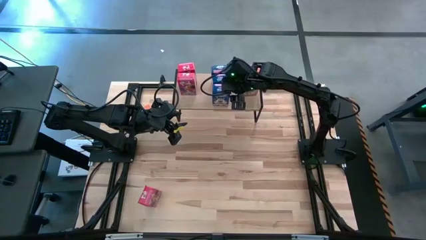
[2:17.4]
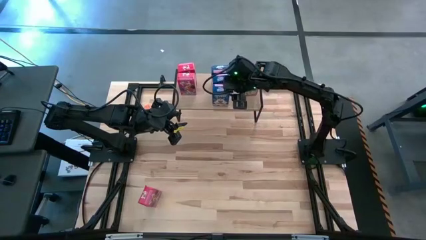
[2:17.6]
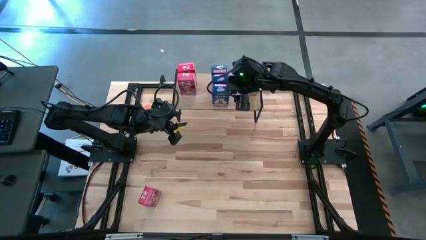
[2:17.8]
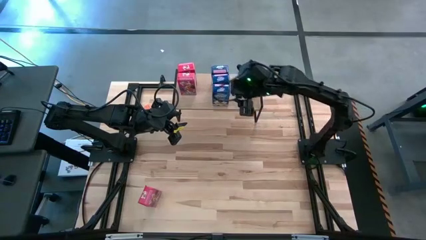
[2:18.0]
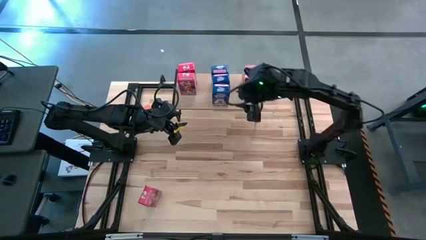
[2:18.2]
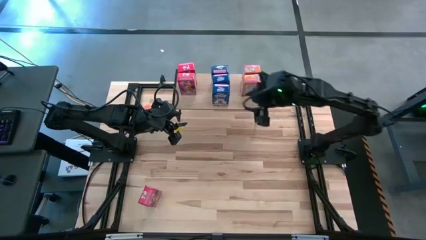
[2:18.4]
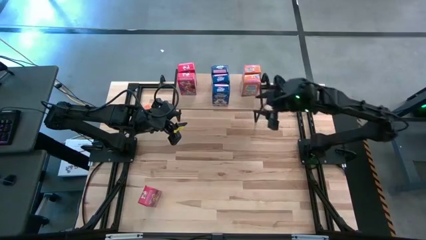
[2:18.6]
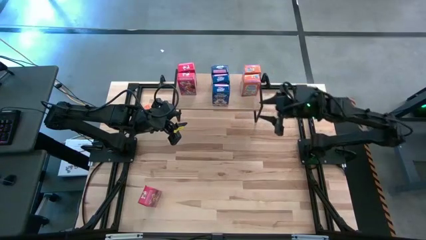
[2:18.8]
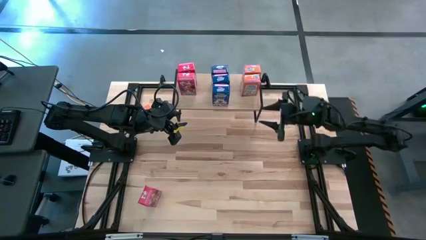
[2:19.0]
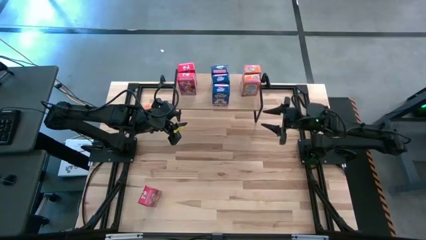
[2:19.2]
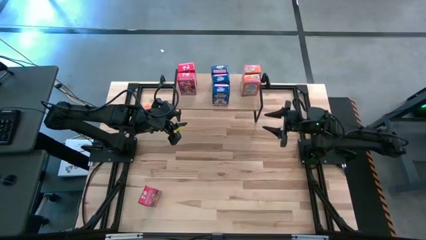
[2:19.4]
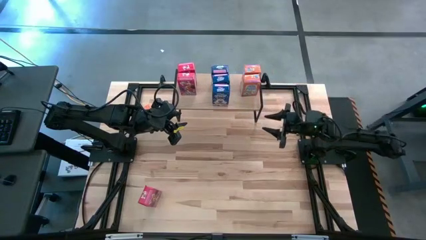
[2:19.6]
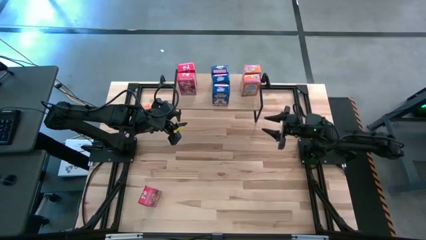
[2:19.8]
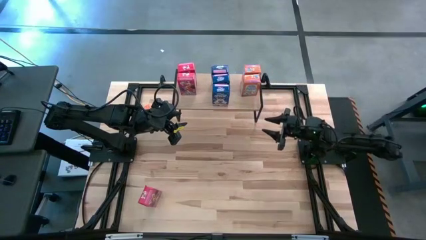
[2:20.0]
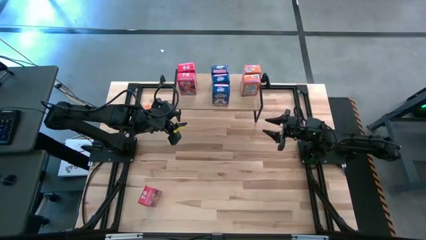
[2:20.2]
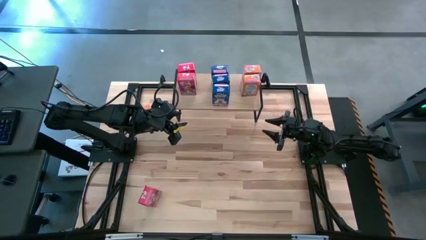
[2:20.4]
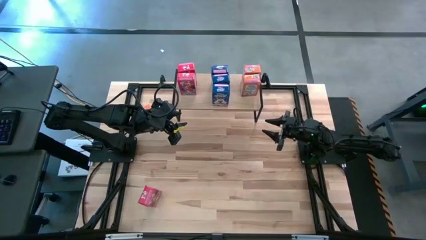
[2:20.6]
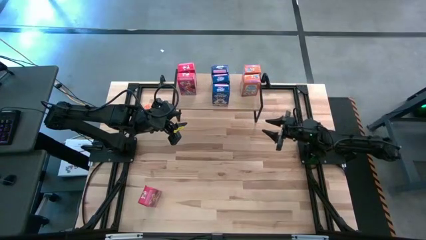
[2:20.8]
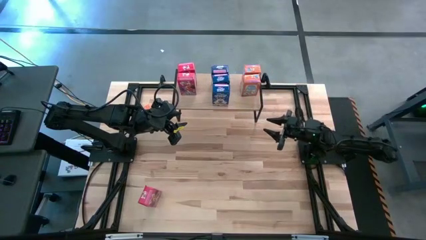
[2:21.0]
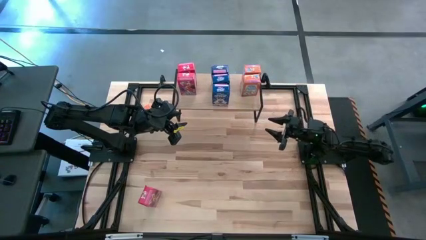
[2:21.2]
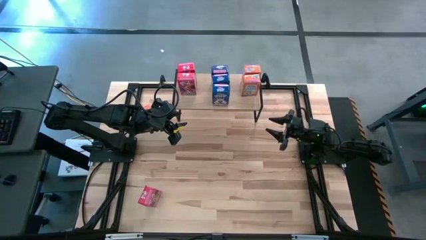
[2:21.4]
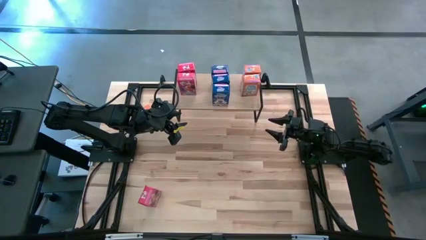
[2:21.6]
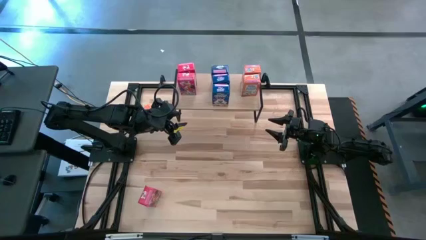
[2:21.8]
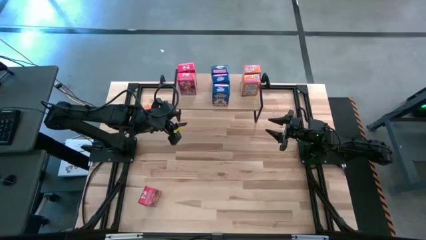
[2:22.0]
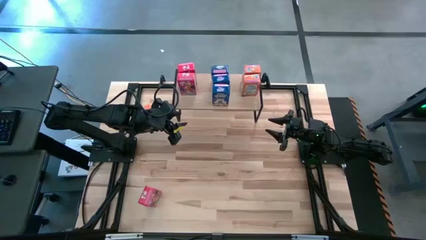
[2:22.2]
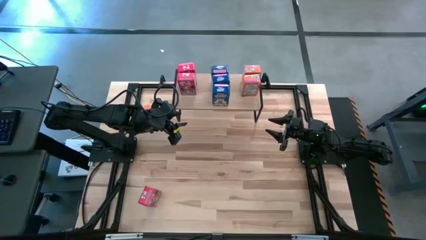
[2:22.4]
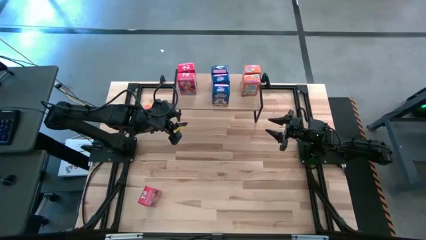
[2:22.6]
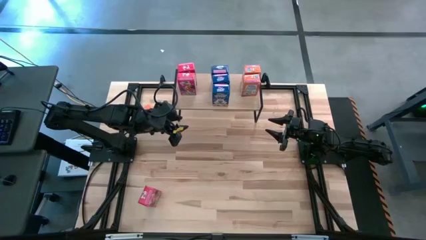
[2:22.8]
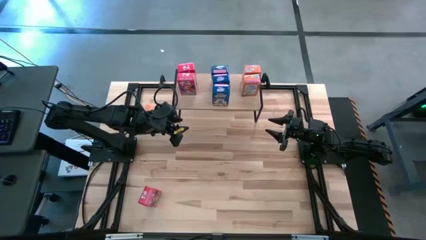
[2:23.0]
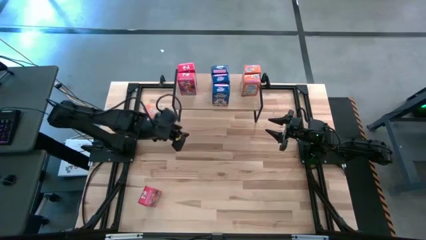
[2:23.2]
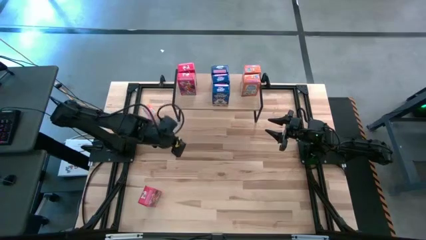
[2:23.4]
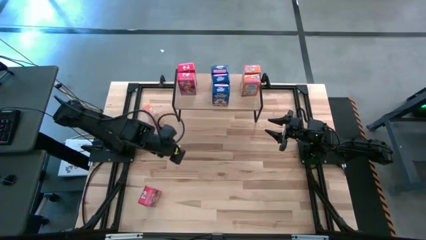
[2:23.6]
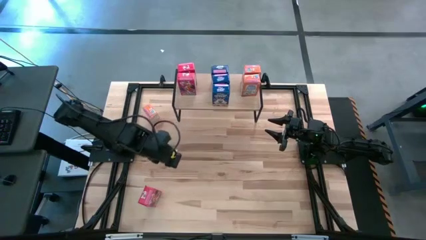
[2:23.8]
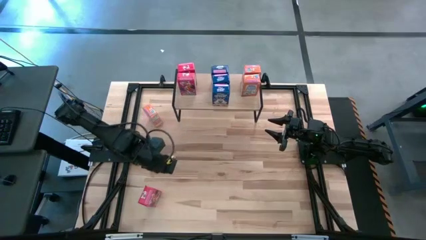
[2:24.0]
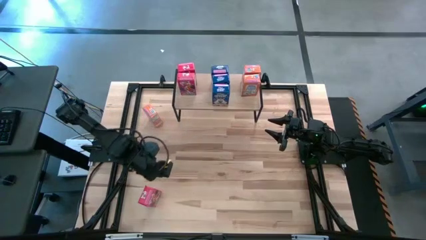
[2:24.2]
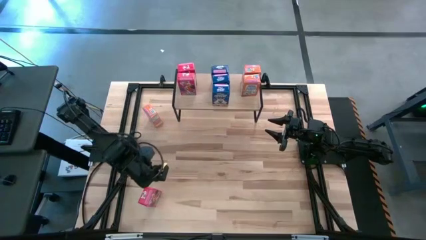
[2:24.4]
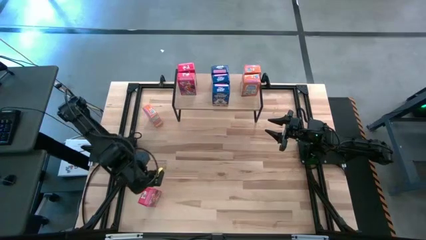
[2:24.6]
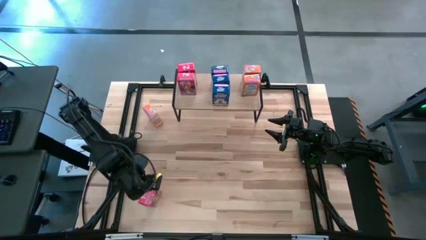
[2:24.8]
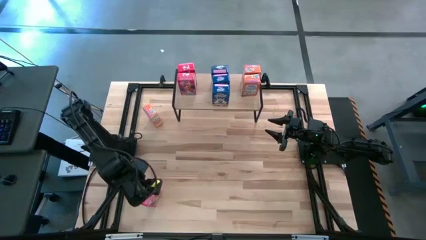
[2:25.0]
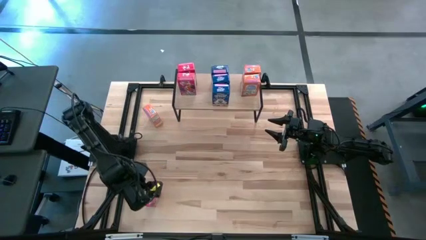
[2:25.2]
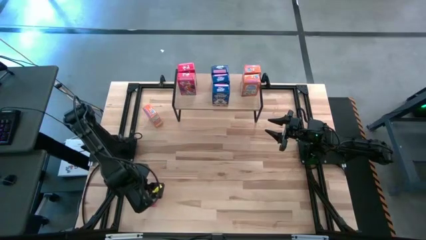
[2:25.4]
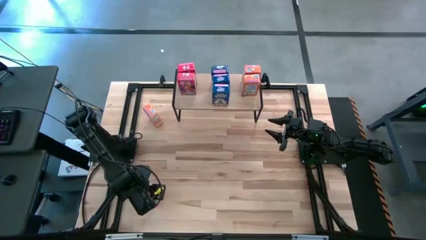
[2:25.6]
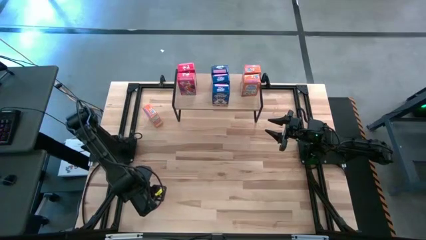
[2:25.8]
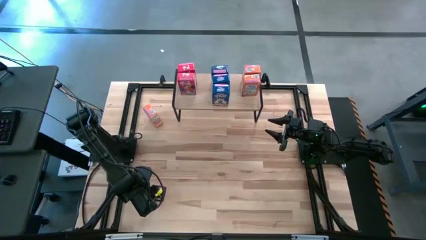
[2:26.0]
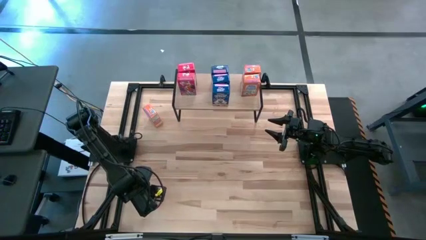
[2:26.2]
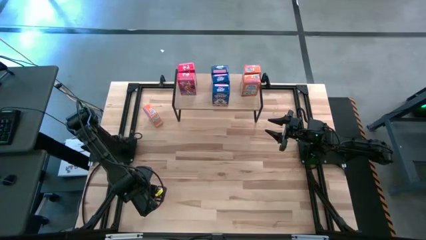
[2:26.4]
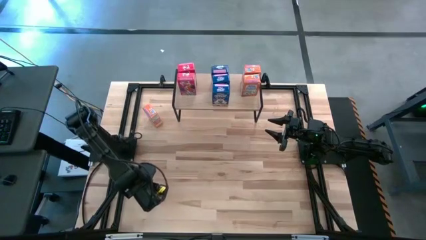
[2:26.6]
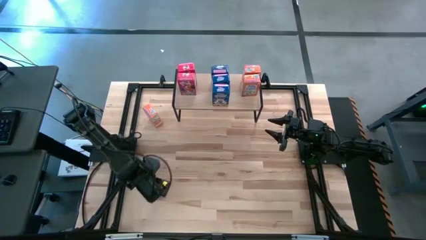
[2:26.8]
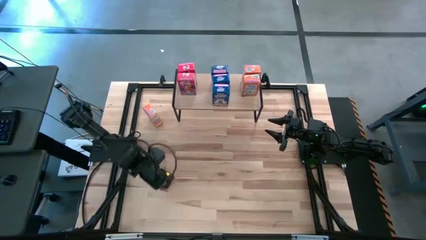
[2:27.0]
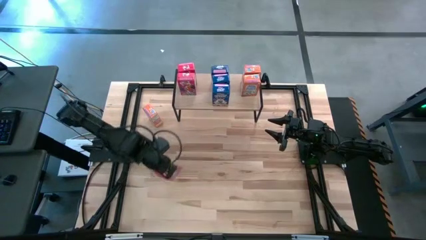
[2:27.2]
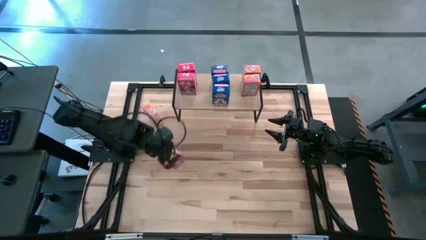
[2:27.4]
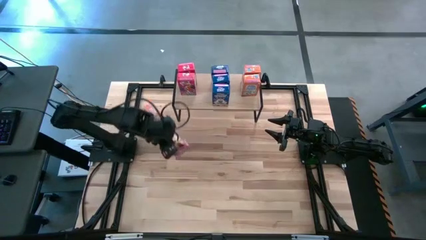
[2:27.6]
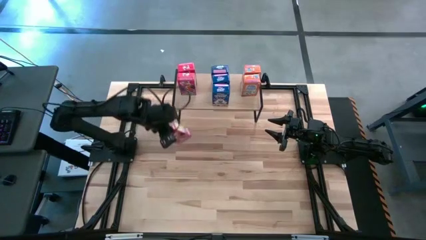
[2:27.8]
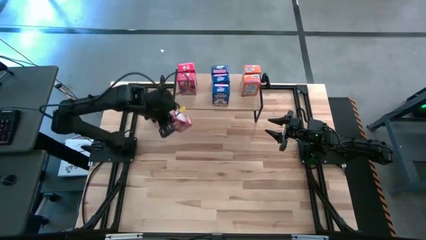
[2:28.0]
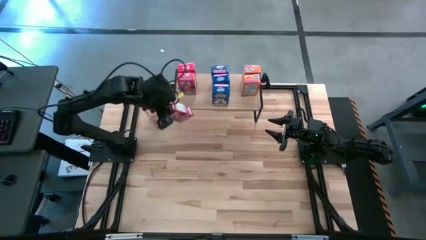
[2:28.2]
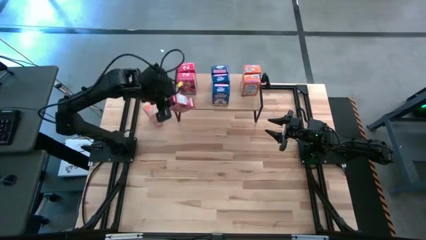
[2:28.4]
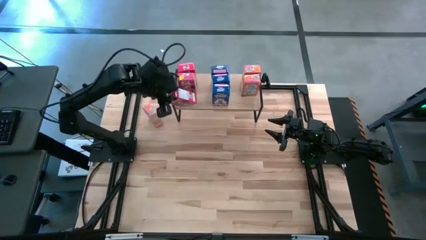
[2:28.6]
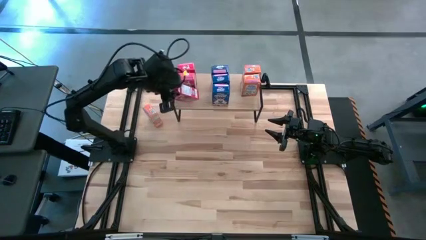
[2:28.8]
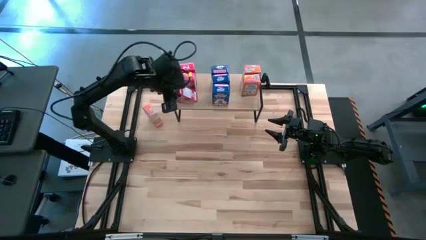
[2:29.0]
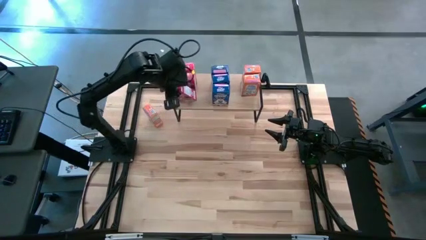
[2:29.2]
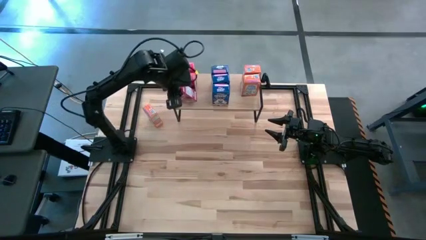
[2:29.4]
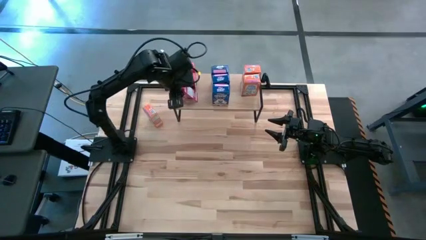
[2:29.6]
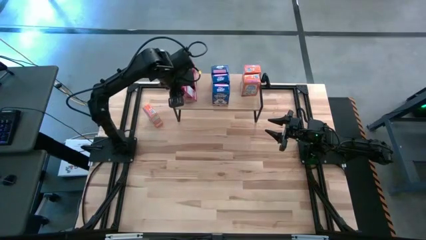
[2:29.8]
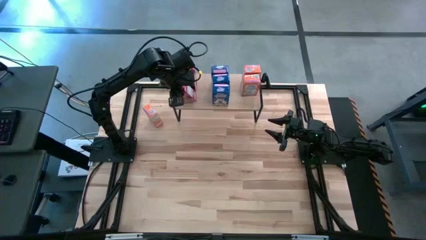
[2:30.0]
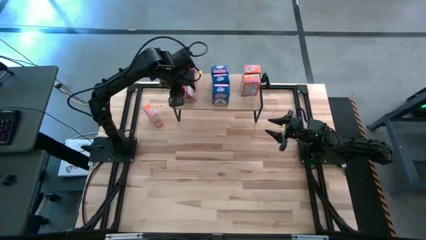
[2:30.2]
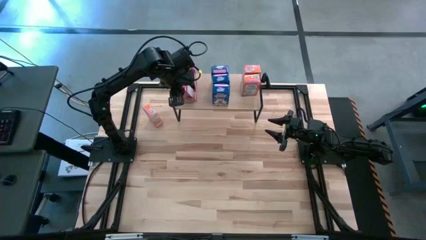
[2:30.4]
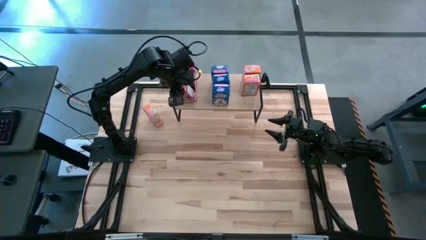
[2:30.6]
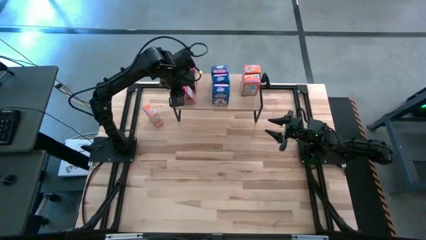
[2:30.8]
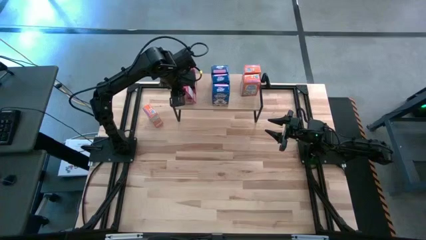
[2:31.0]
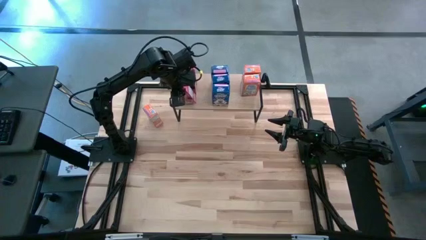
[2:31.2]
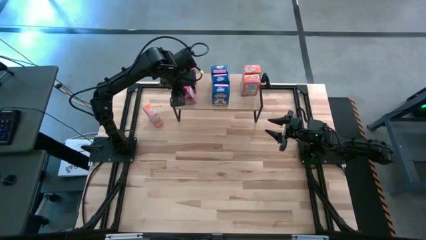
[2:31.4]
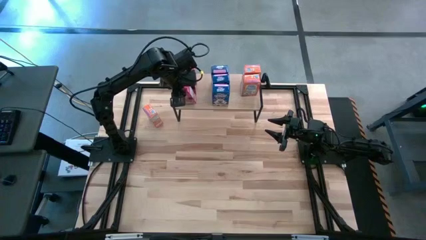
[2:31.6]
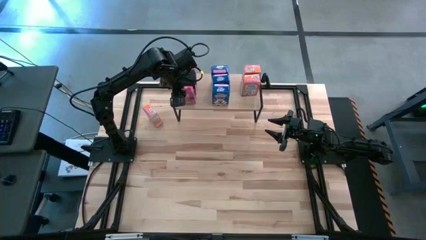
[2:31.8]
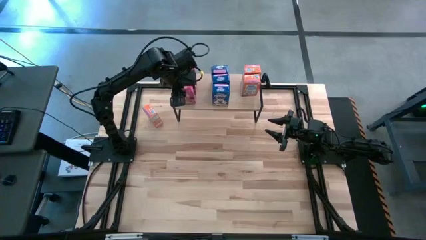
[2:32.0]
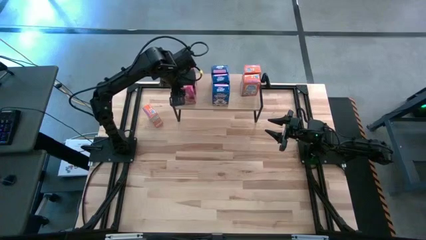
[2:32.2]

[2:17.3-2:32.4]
Task: Stack cereal on shelf
Put the red cereal box on the shelf

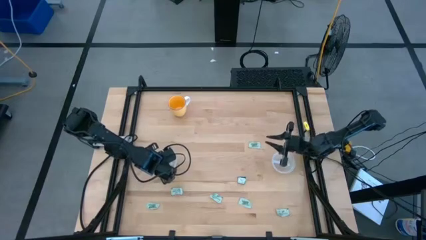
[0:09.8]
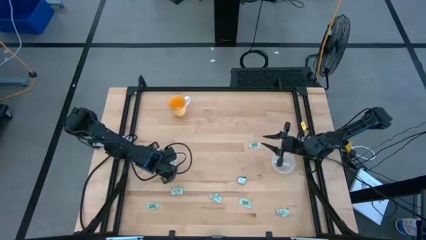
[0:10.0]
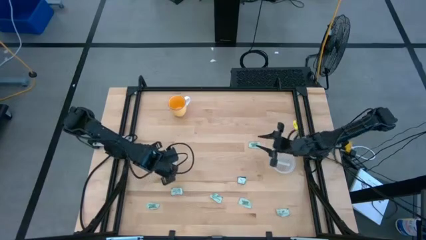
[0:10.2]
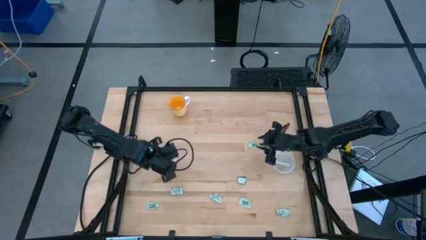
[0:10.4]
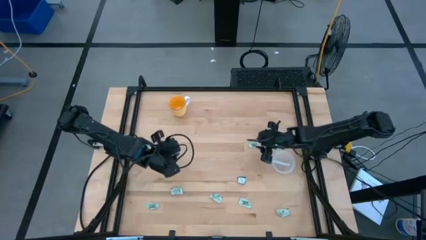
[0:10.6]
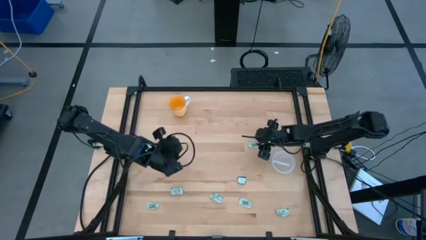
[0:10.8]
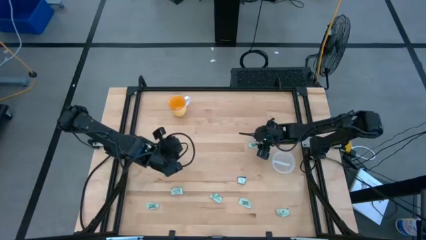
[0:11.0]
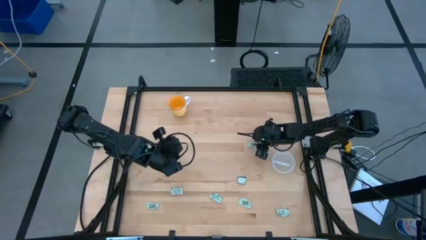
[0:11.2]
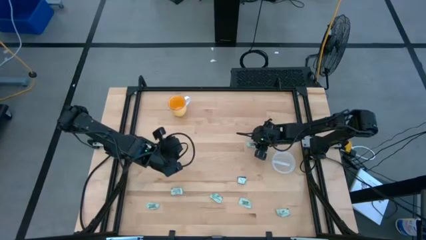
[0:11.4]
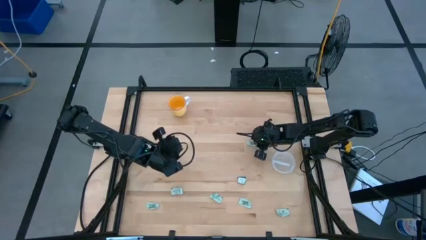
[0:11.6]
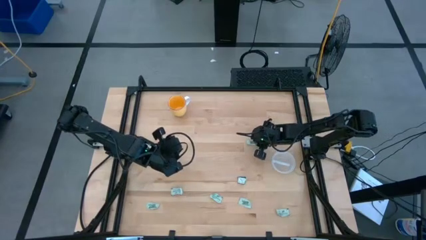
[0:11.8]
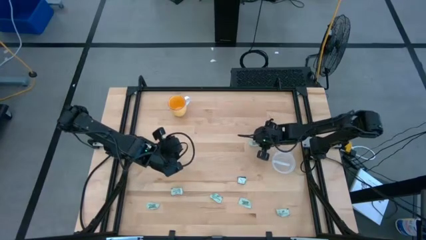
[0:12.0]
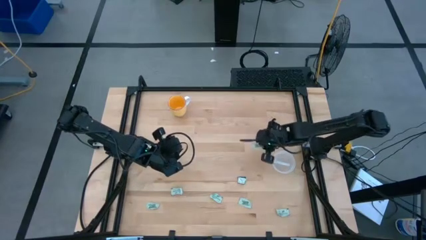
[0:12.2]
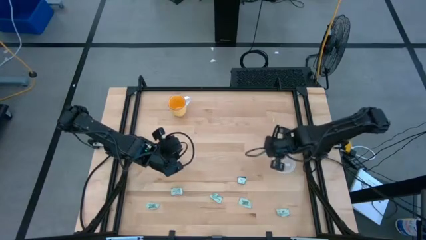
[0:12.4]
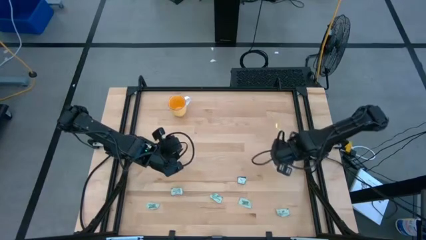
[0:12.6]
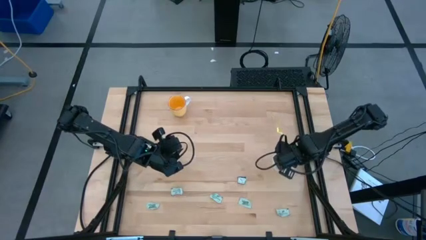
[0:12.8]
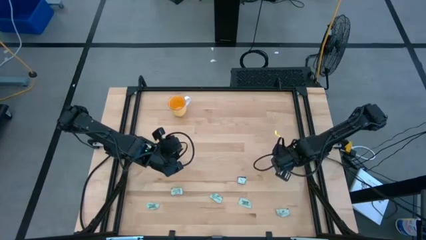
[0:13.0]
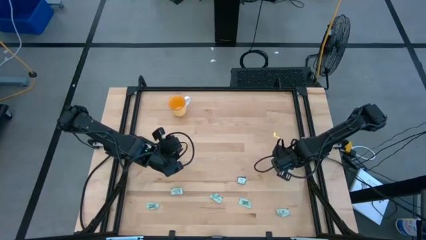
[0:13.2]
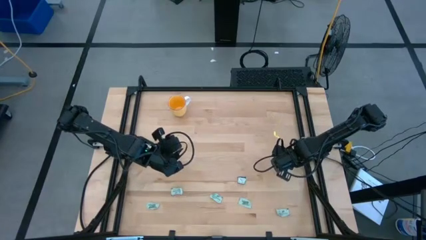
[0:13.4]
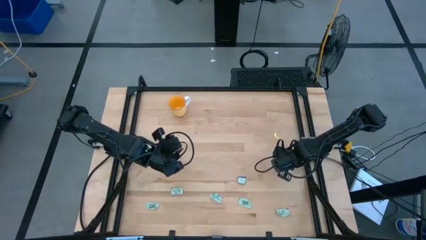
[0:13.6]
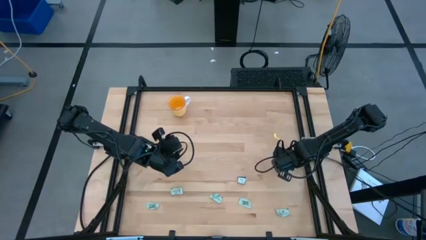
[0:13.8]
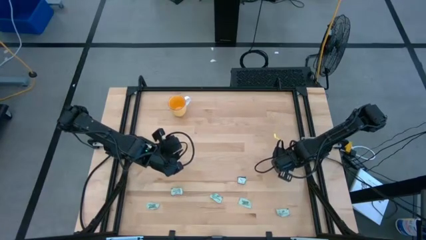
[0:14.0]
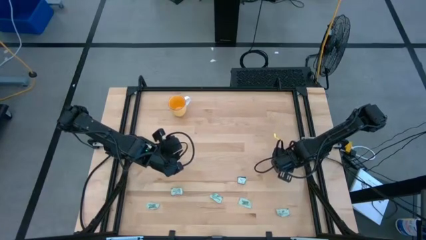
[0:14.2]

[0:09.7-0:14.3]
Task: Pick and place items into bin
Put the stevia packet into the right transparent bin
